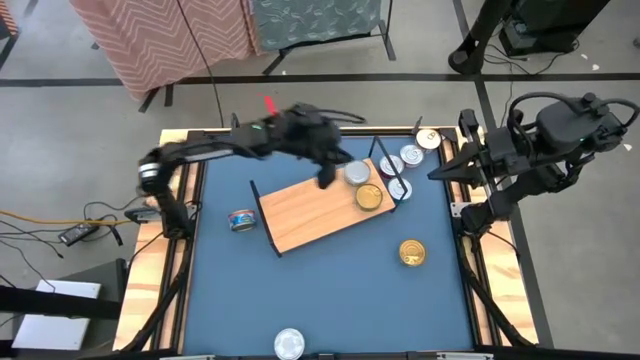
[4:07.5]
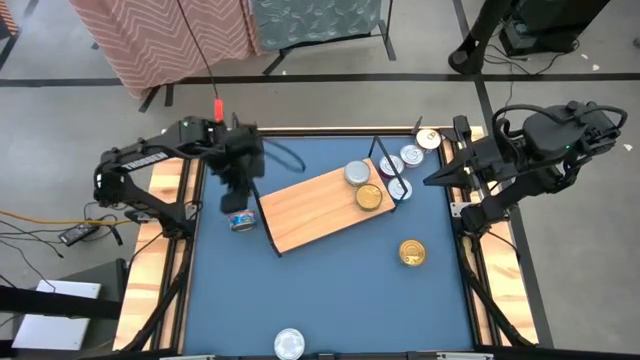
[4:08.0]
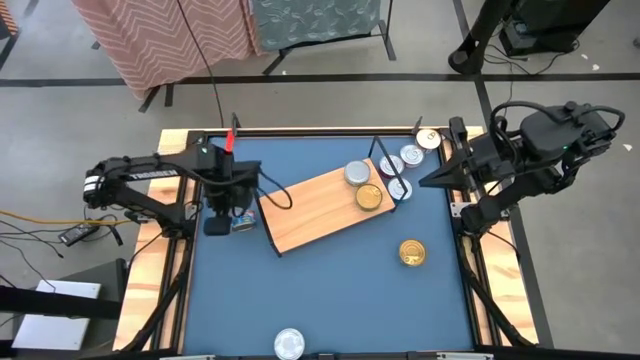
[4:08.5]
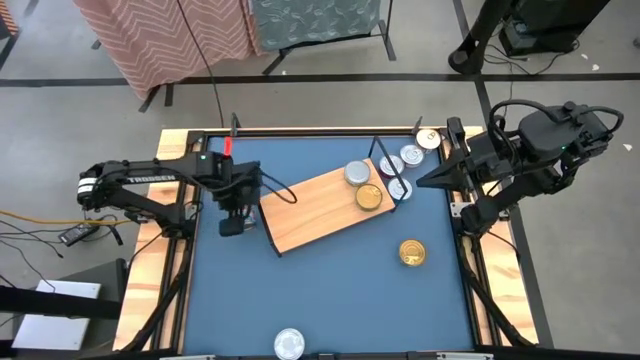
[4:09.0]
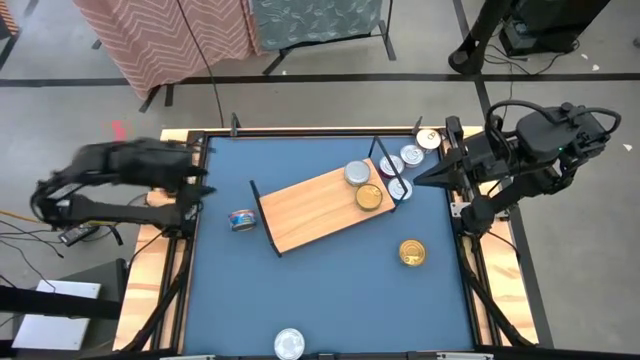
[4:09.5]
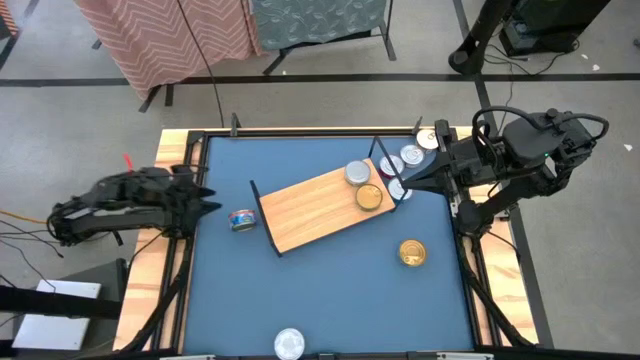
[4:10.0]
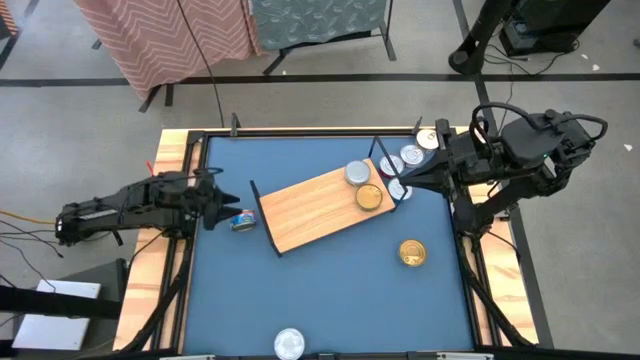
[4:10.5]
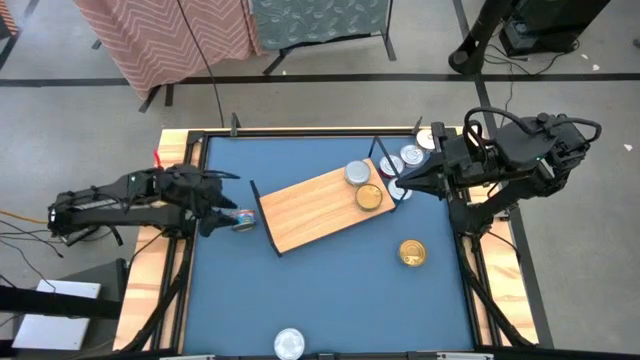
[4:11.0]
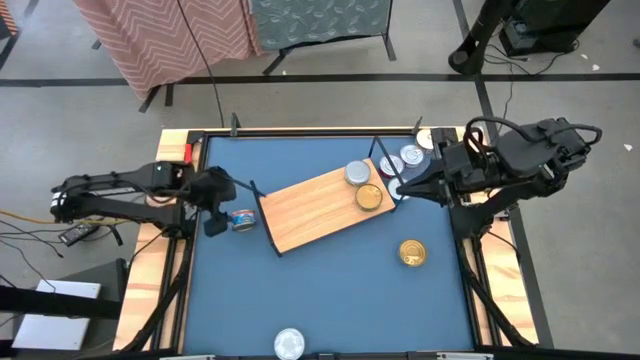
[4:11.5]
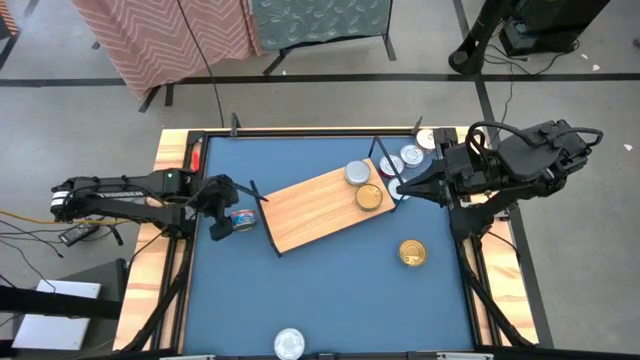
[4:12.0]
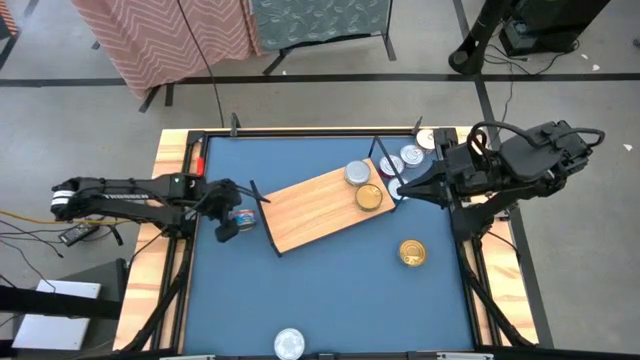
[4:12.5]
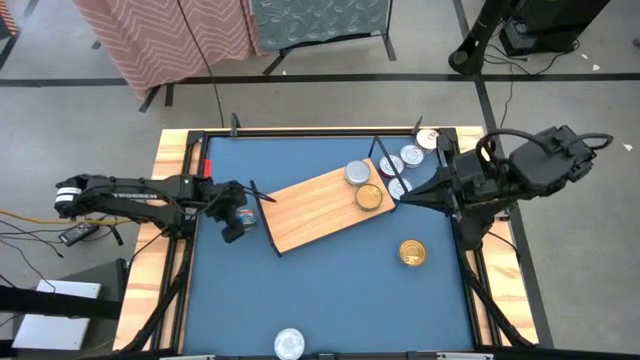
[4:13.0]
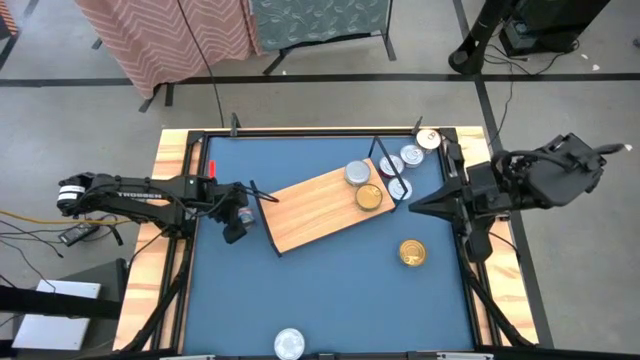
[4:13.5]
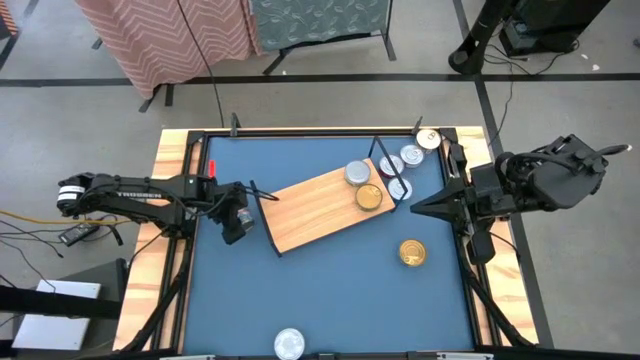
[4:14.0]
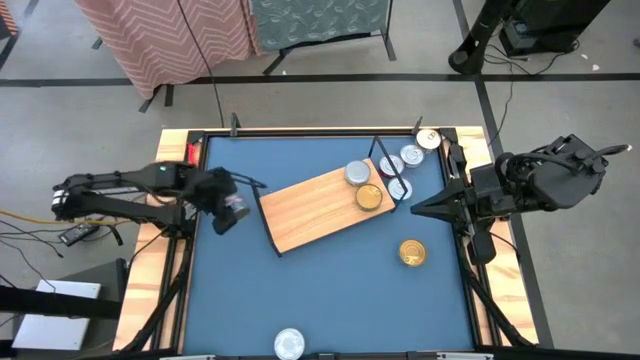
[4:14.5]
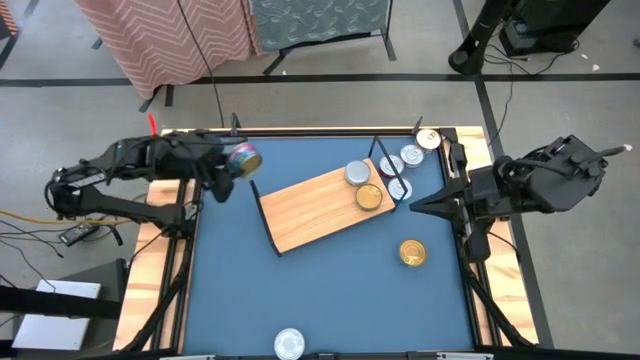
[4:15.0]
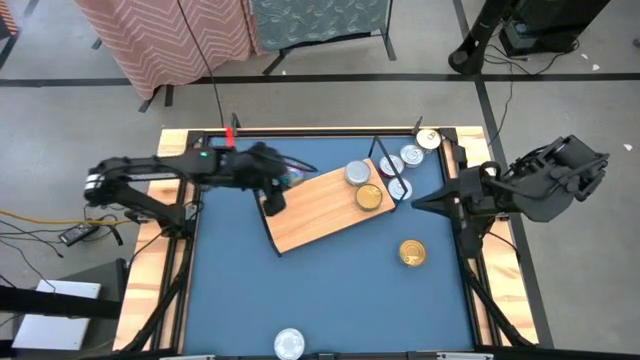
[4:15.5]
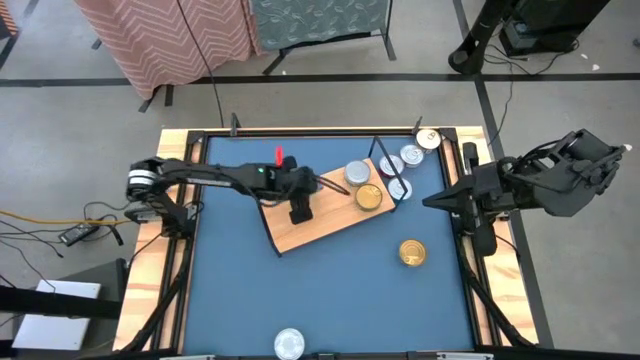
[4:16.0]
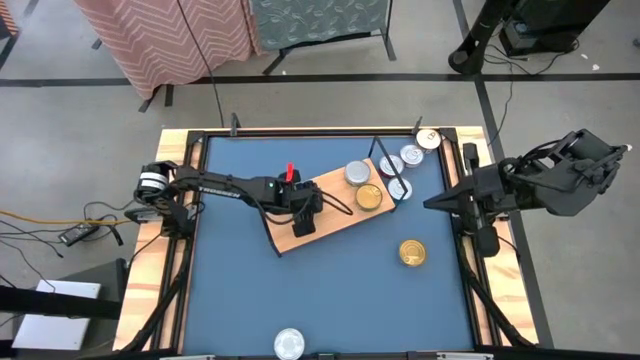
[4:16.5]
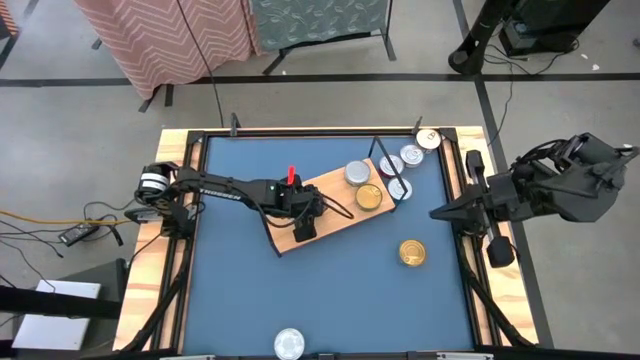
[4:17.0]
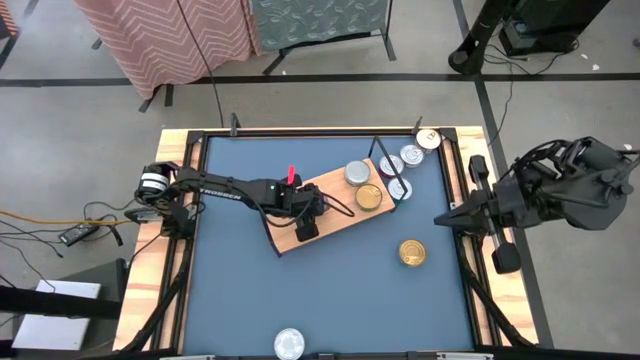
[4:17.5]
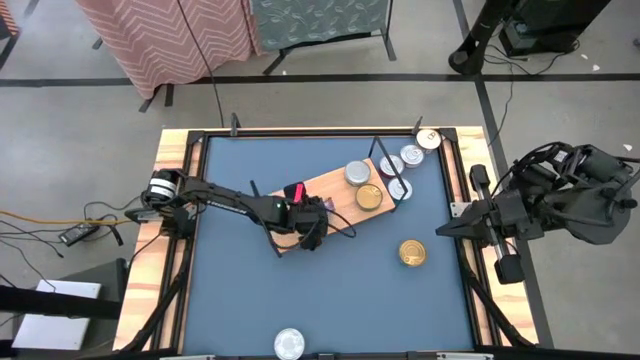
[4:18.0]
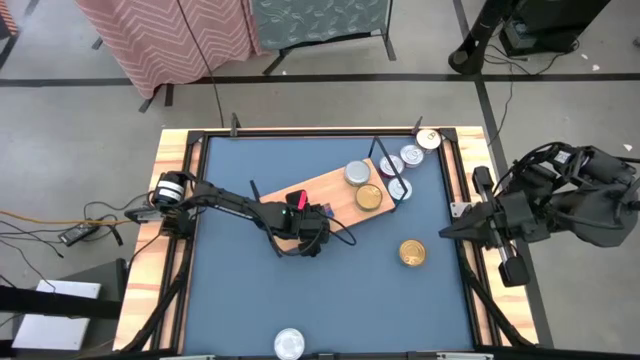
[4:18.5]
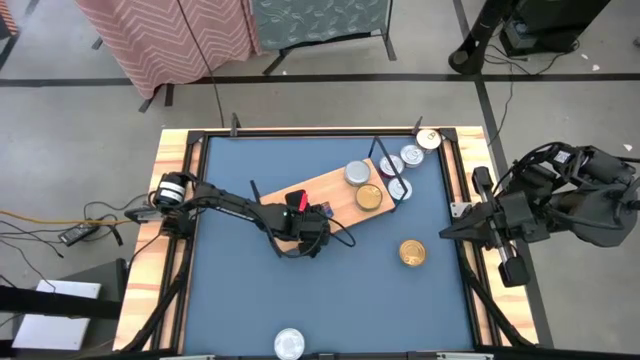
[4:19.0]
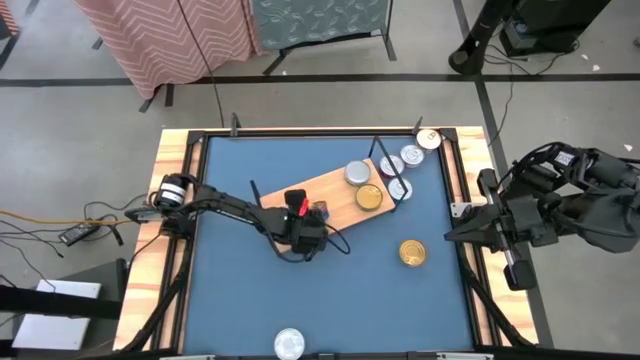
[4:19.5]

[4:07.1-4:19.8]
Task: Stack canned seafood by type on shelf
Put the blue/pink tuna can on the shelf

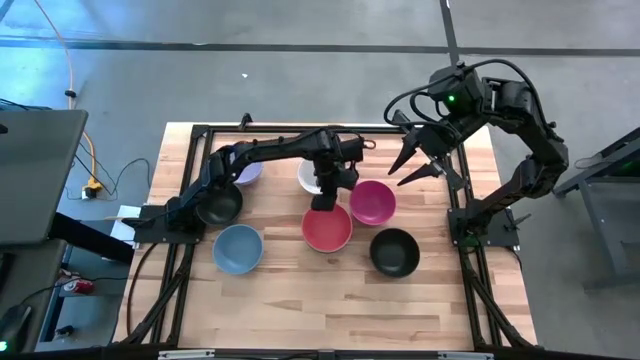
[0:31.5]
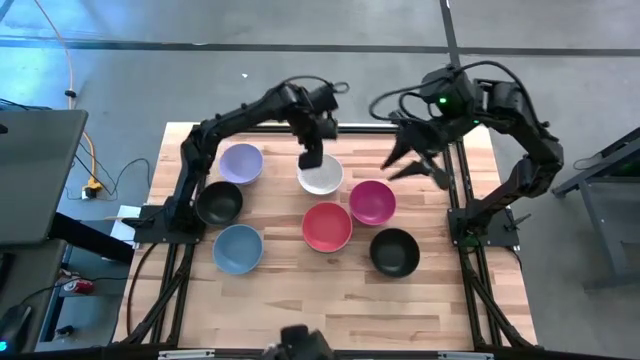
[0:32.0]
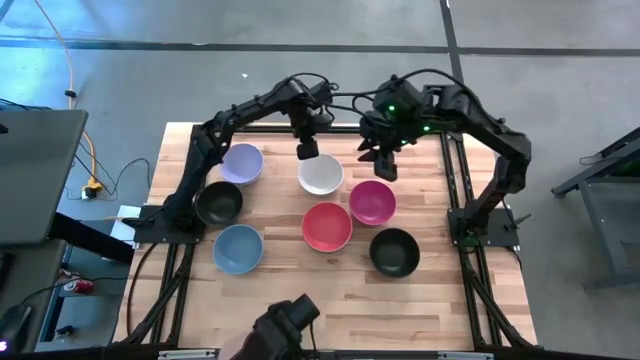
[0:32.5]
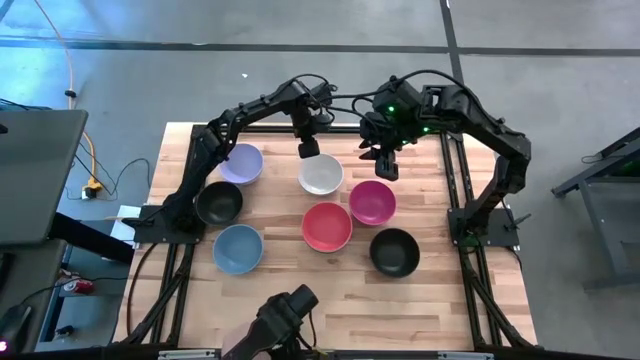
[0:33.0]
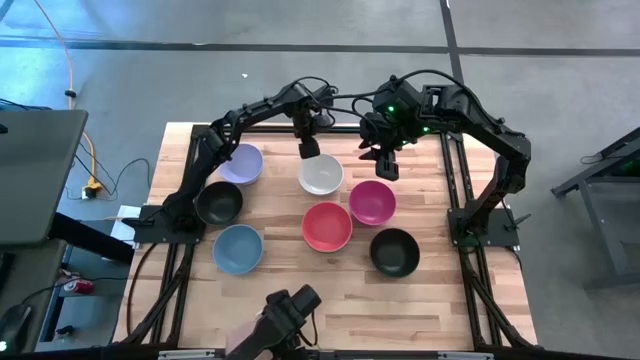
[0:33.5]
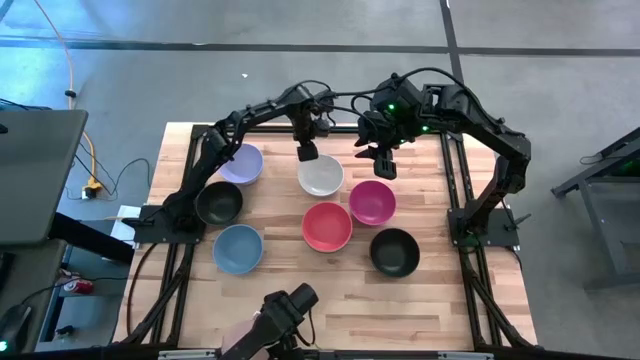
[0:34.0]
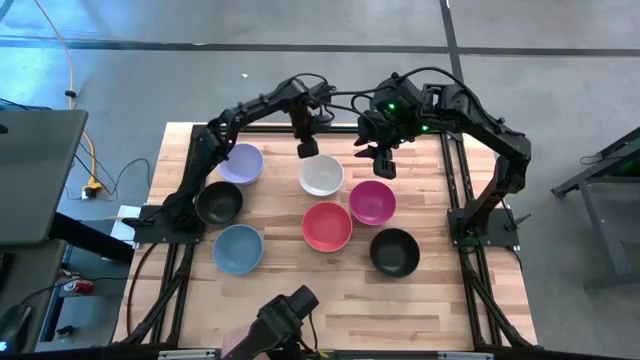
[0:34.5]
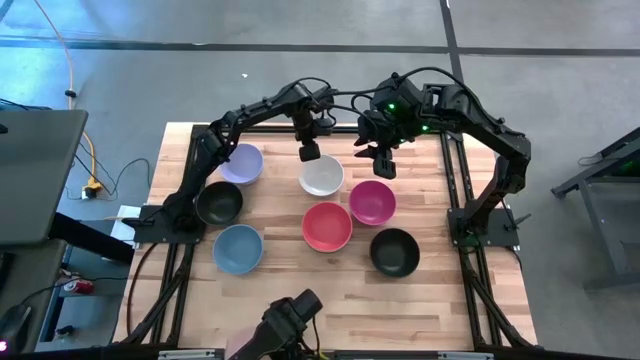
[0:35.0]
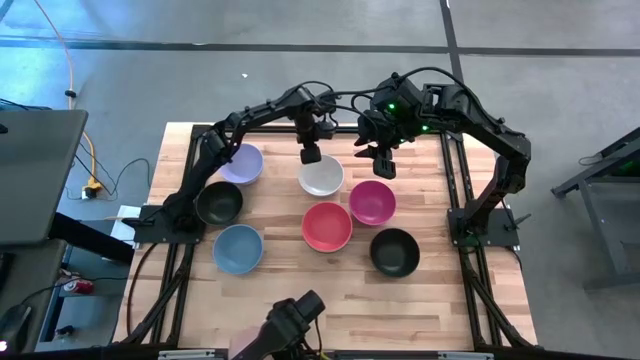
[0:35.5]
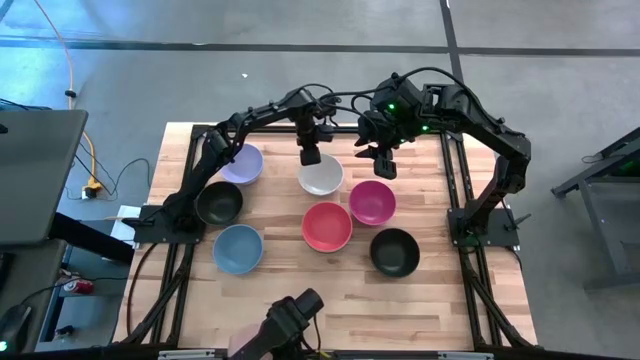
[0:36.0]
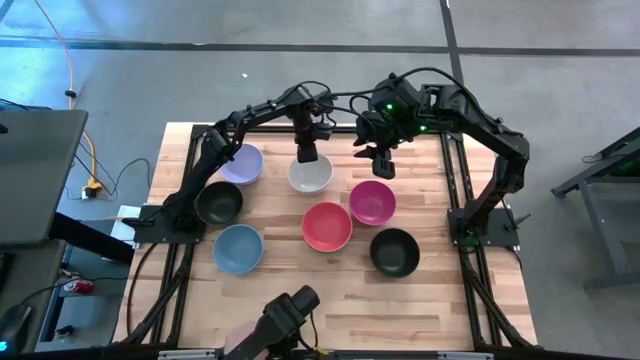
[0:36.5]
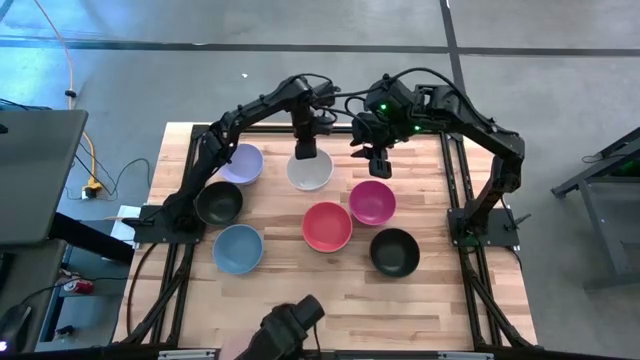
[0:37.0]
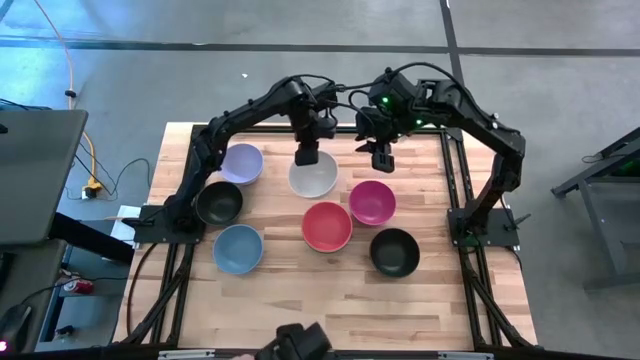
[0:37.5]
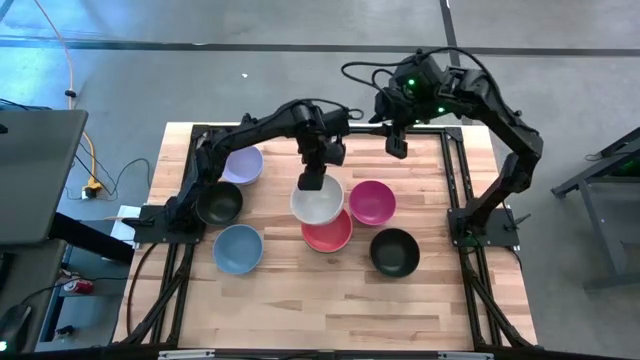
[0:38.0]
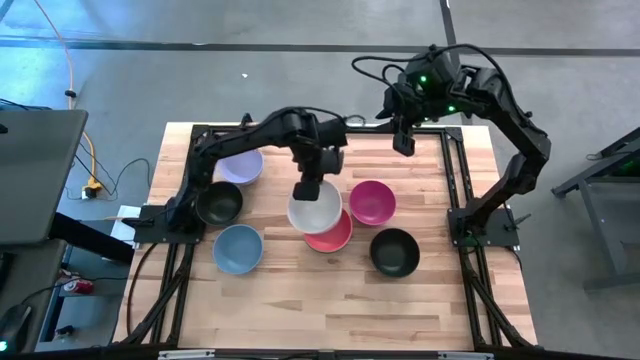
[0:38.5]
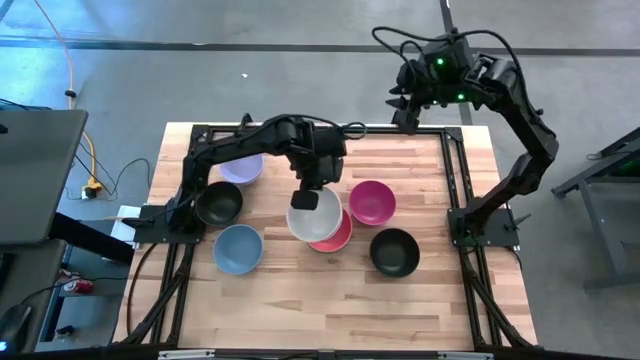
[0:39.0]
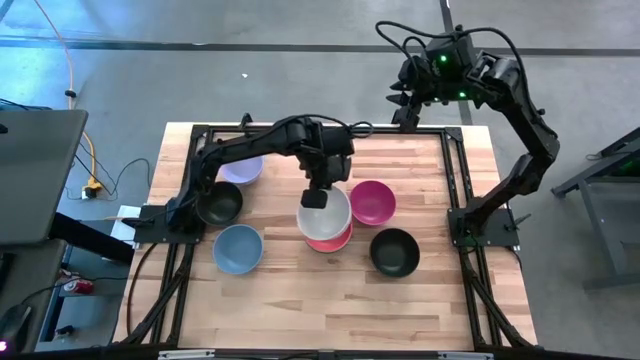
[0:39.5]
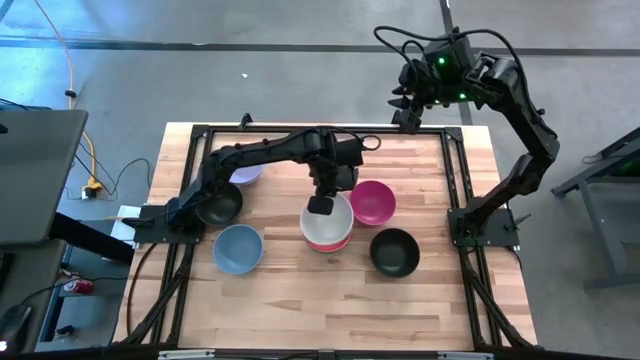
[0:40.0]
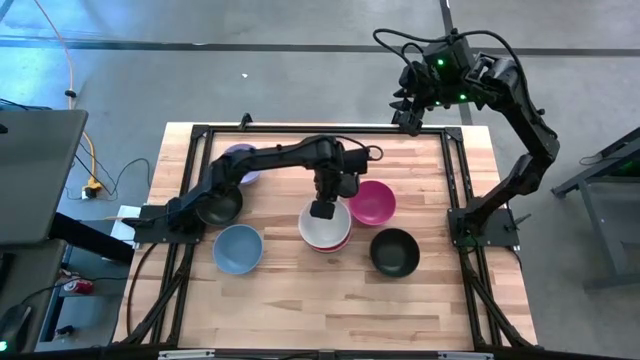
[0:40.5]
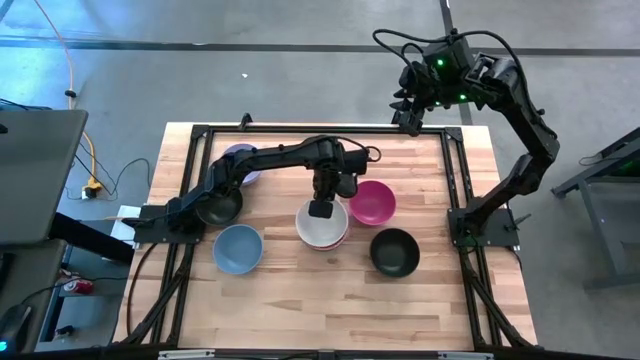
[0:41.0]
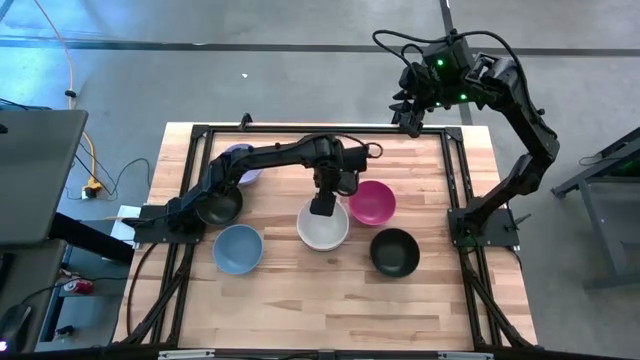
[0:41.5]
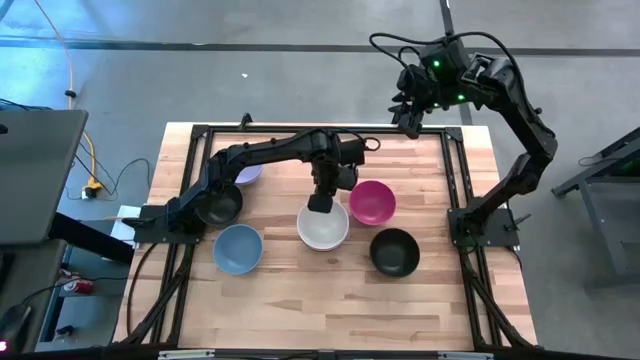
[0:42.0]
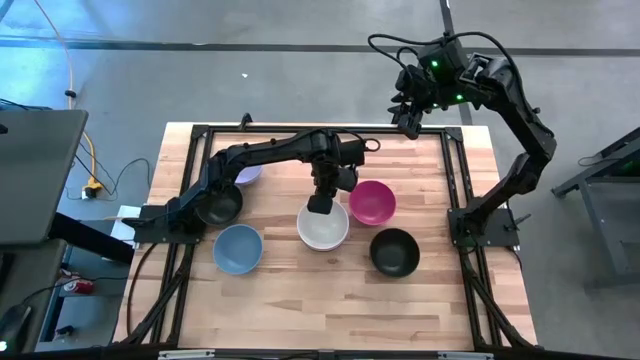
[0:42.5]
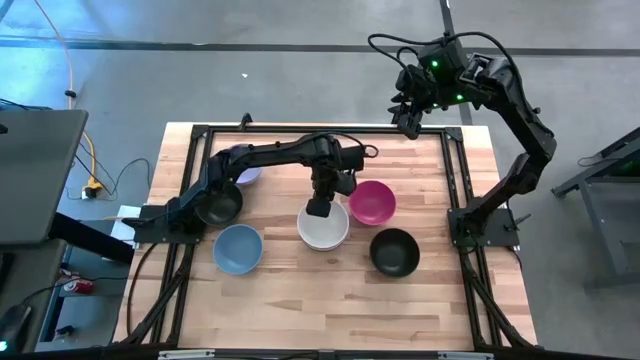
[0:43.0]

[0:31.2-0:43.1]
Task: Nest bowls inside each other
Stack the white bowl on top of the orange bowl
